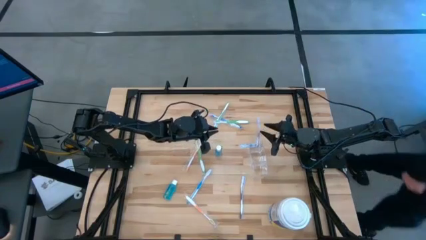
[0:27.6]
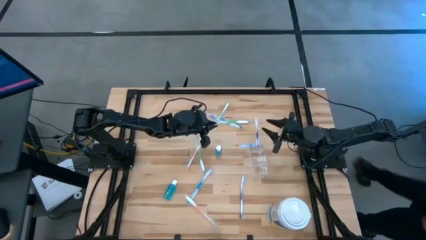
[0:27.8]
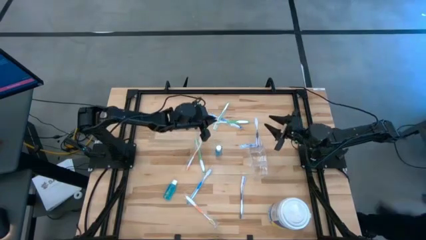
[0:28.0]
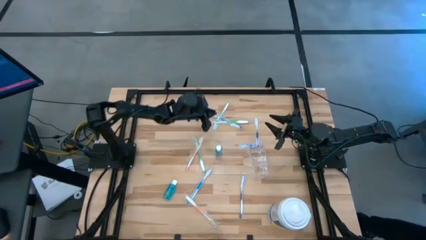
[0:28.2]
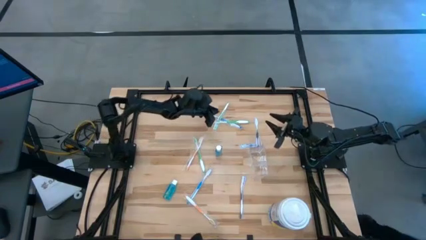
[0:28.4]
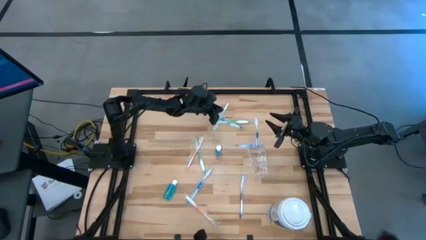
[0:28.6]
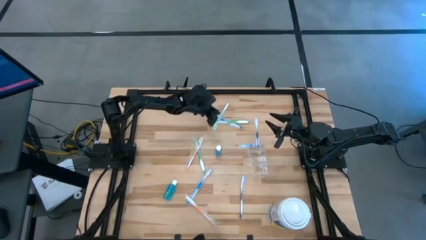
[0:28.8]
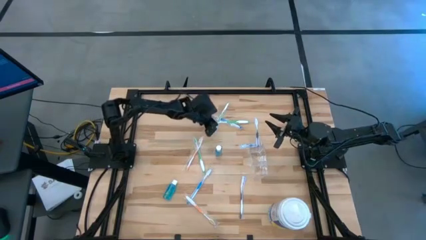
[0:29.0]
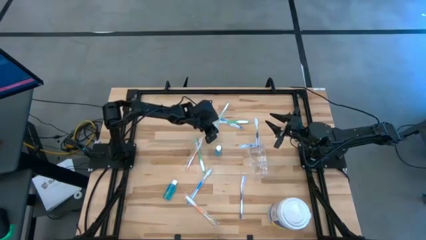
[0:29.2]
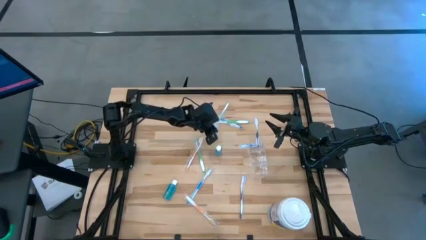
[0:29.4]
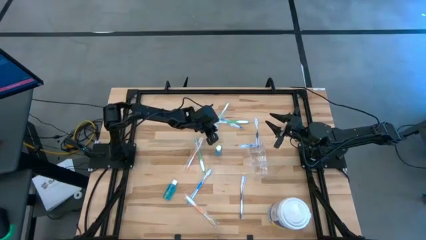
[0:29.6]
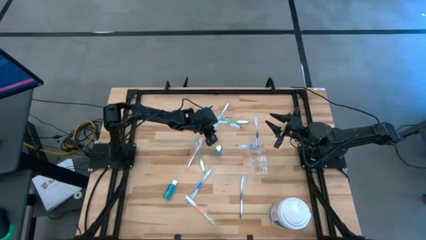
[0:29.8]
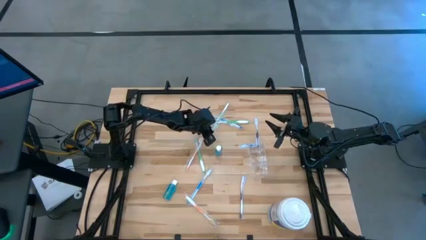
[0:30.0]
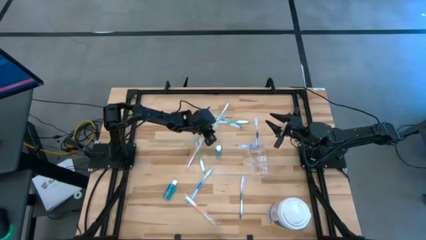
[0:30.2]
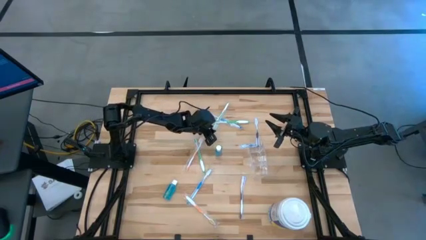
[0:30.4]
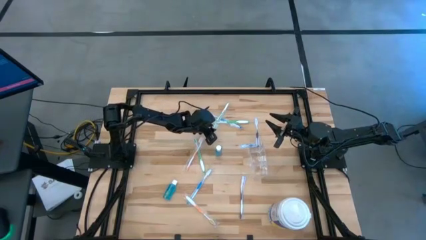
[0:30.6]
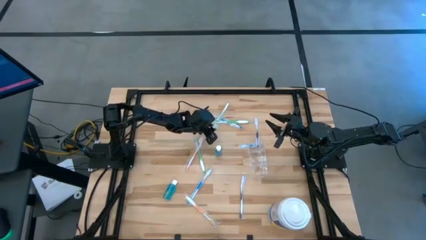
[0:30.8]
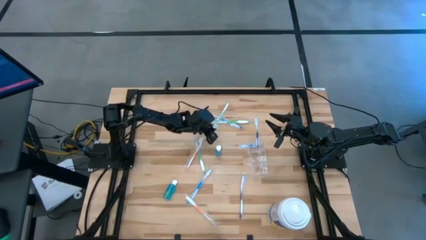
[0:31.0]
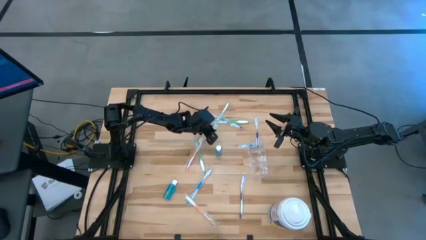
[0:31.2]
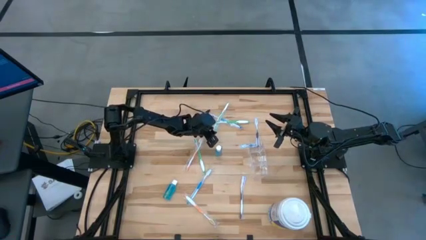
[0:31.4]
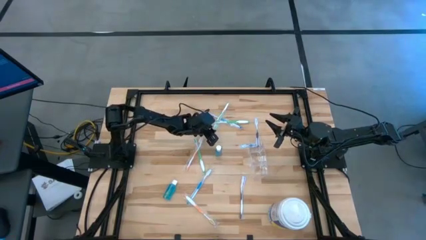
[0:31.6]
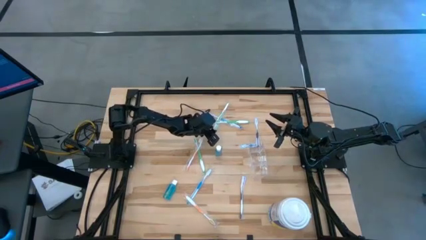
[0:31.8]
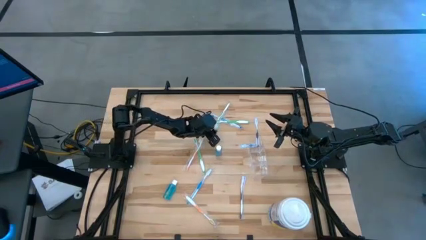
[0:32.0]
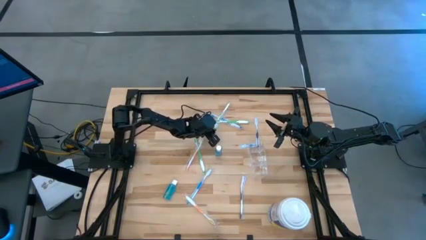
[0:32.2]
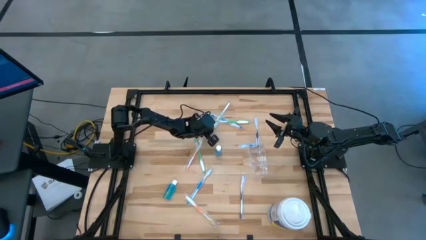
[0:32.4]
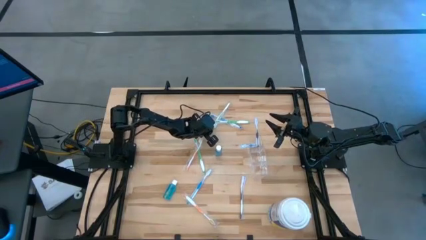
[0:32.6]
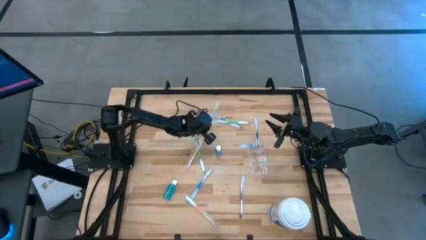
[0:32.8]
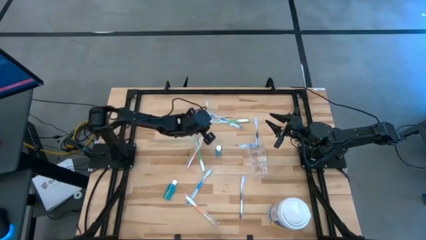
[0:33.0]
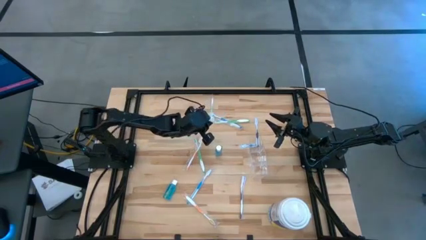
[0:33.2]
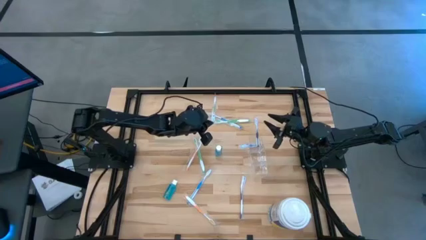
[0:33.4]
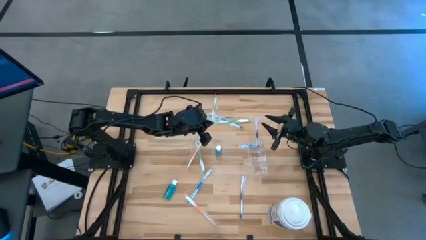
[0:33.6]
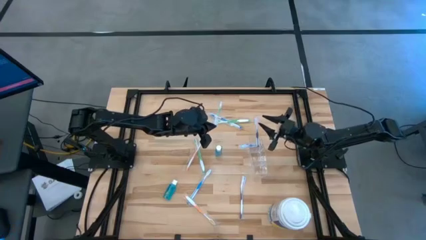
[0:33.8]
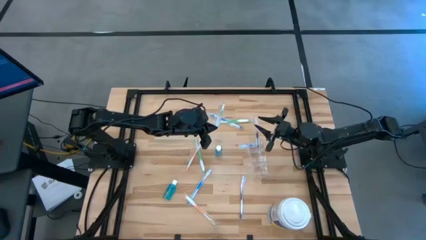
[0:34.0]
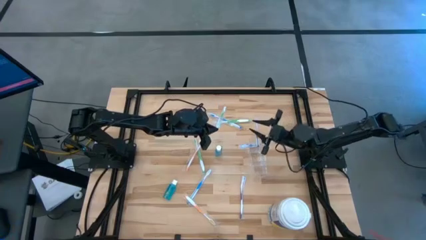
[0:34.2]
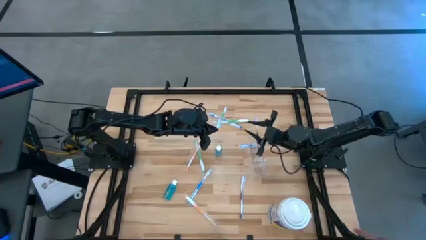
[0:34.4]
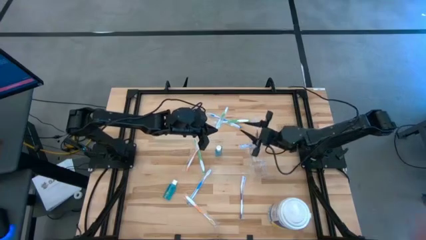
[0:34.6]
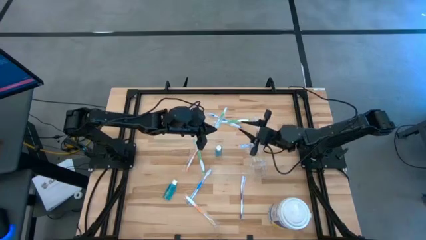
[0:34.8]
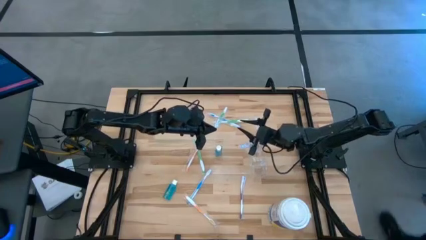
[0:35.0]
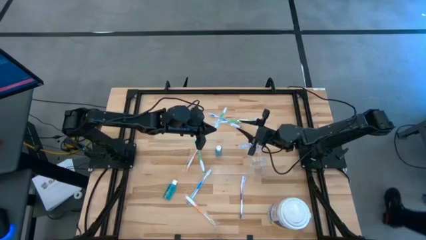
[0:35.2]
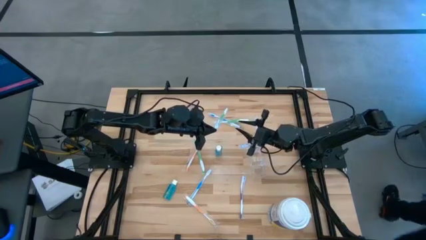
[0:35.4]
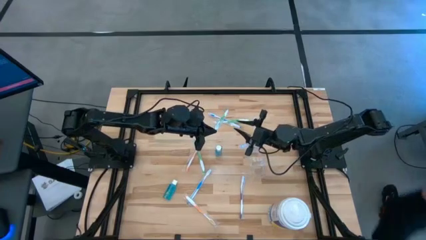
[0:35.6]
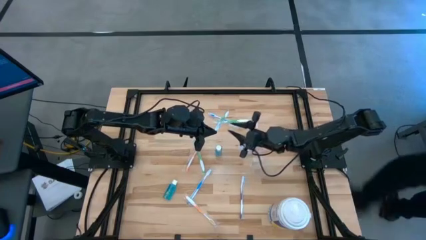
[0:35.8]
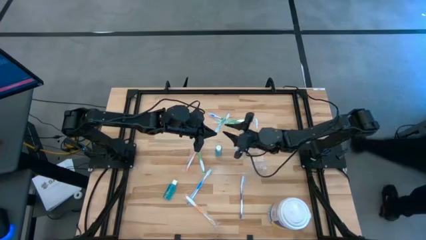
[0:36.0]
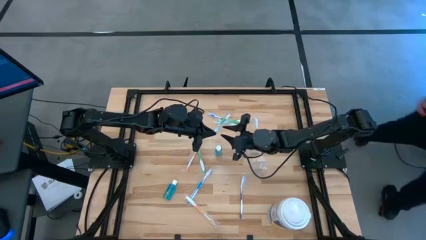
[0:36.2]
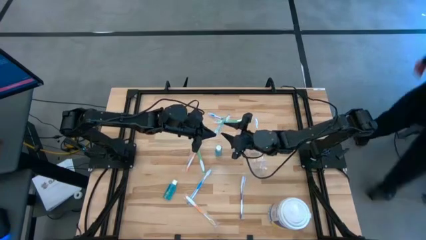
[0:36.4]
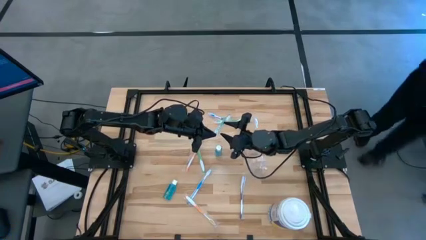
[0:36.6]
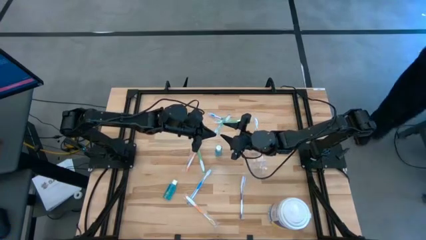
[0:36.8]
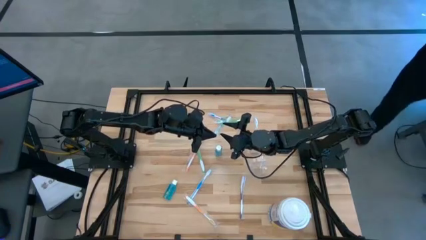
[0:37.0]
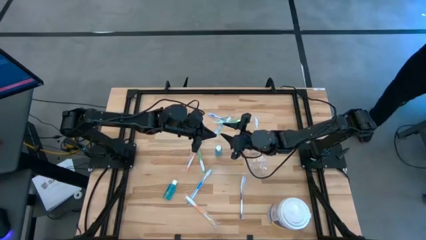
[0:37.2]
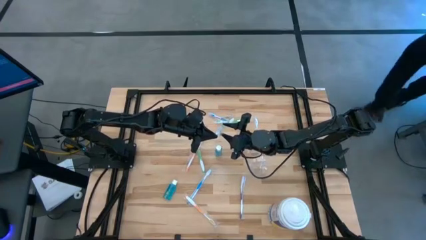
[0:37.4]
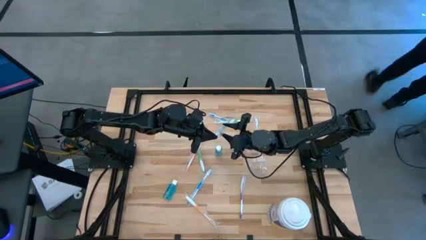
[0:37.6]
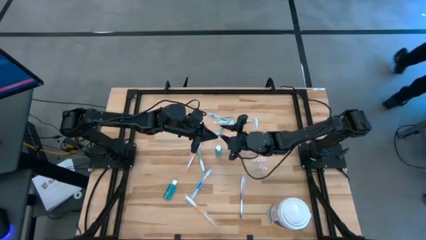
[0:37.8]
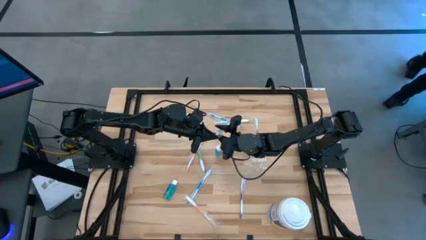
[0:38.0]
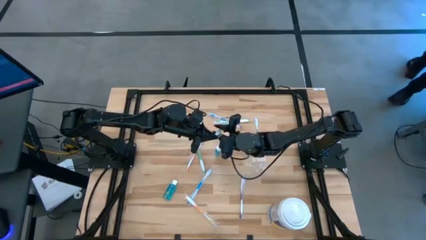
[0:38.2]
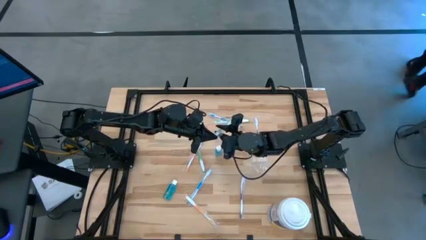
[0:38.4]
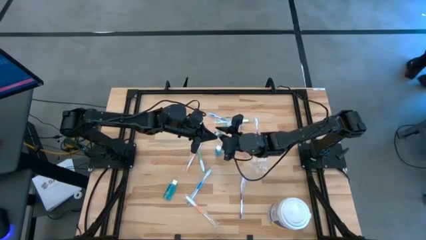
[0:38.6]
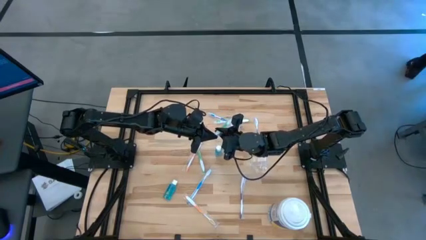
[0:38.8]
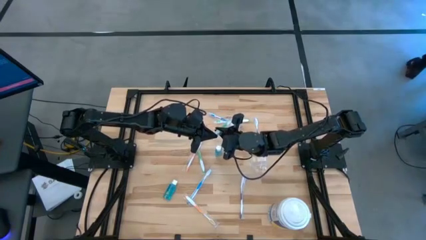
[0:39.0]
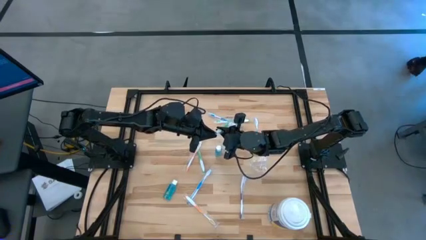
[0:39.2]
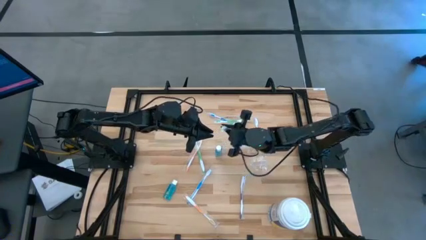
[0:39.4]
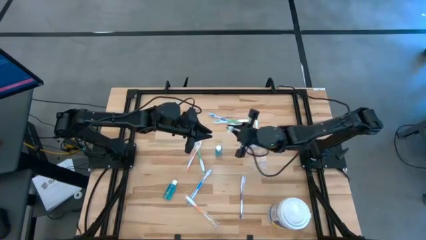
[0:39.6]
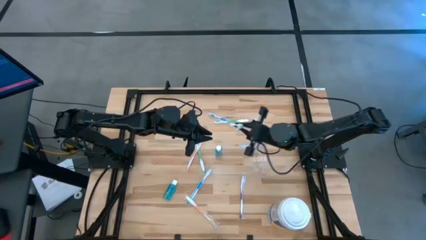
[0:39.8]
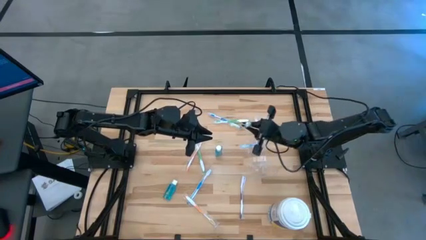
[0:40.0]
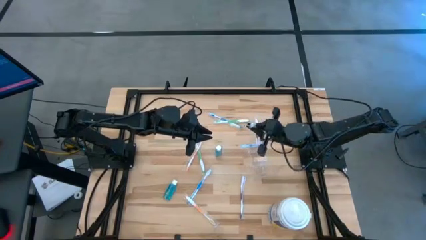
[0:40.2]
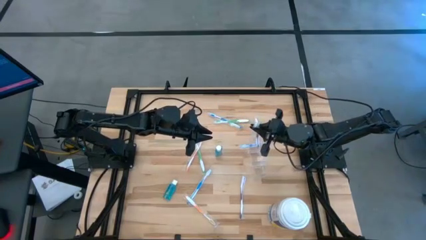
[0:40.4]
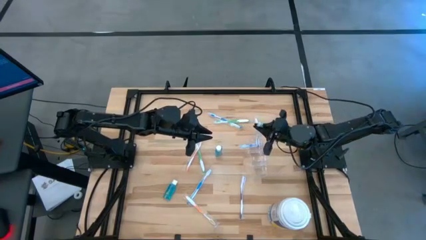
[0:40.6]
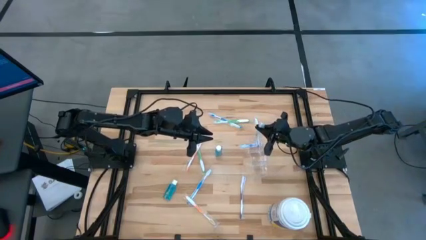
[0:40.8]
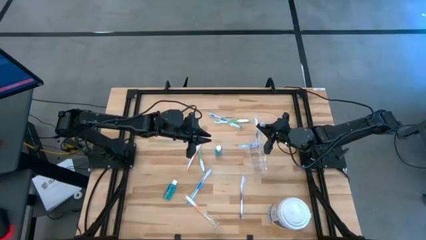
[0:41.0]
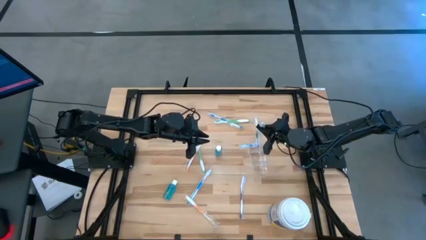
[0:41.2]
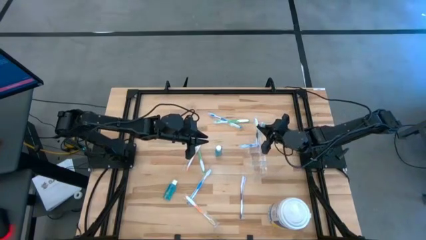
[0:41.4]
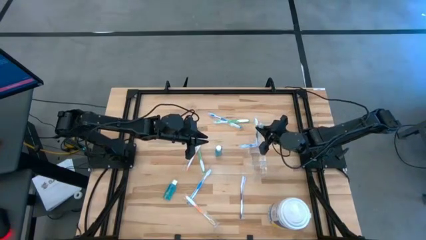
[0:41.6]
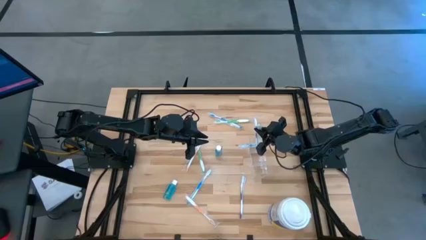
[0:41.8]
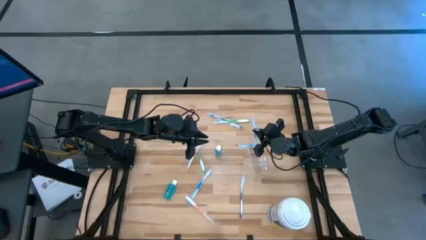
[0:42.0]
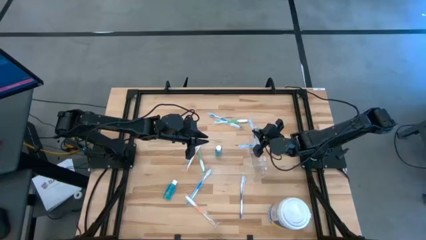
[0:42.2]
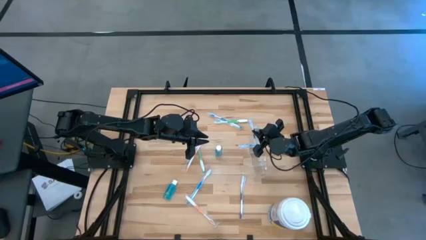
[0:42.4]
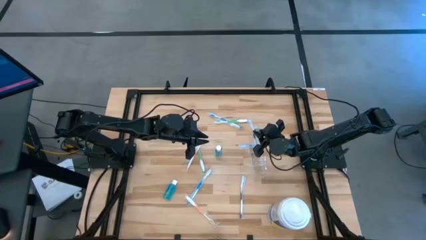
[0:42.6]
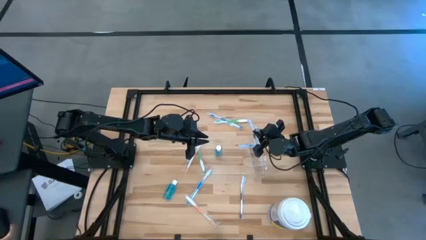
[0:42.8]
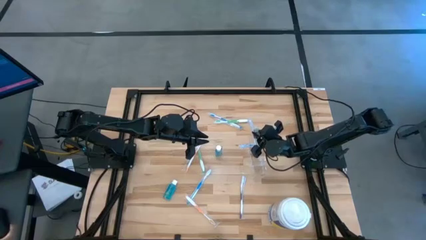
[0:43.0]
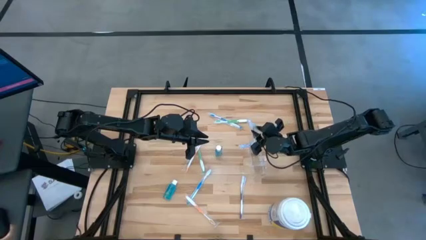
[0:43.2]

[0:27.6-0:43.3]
Task: Pick & Place toothbrushing station
Put the top left green toothbrush into the transparent organizer
